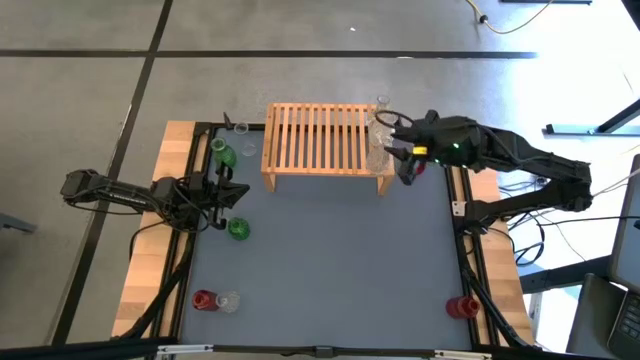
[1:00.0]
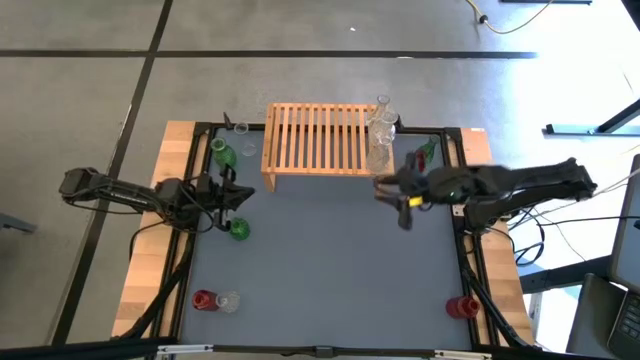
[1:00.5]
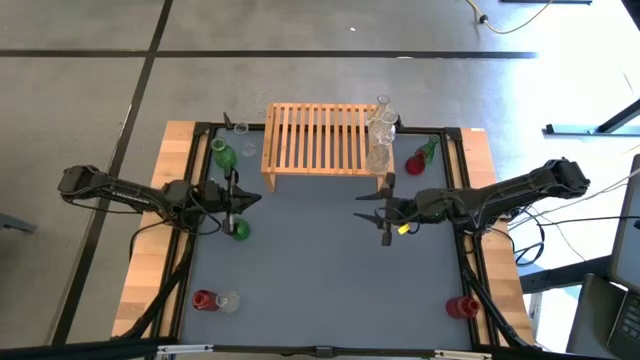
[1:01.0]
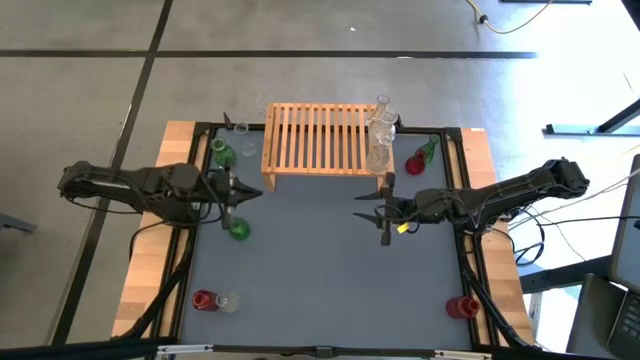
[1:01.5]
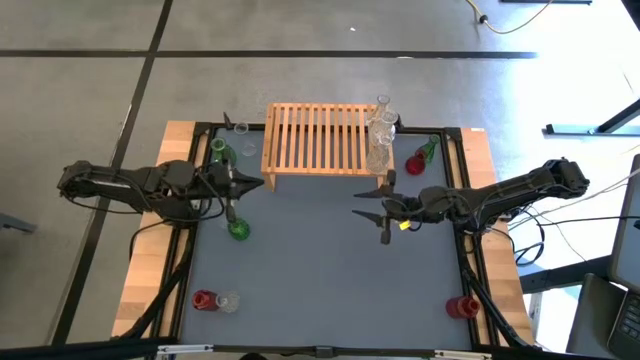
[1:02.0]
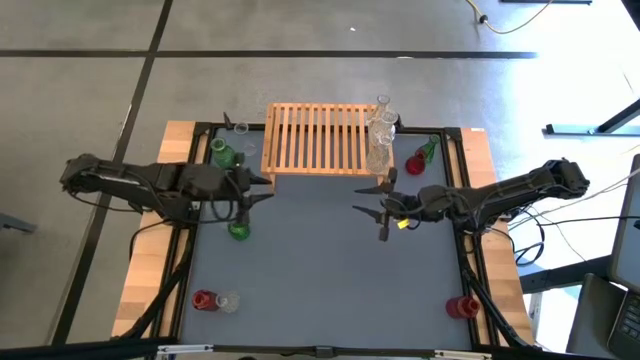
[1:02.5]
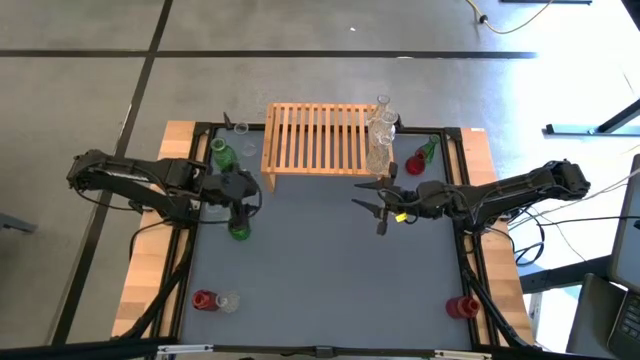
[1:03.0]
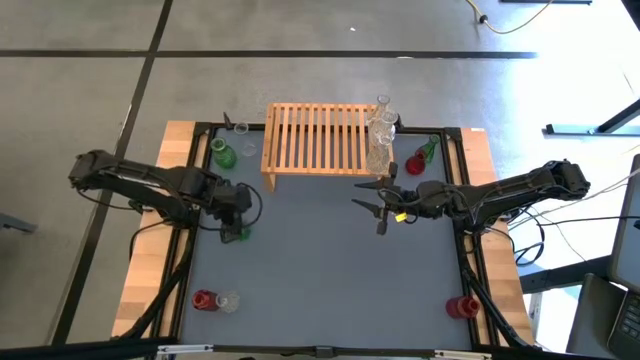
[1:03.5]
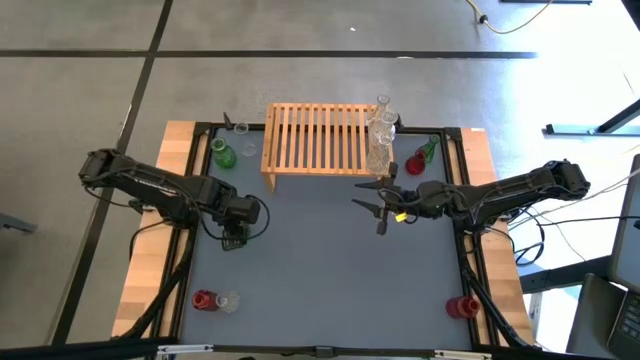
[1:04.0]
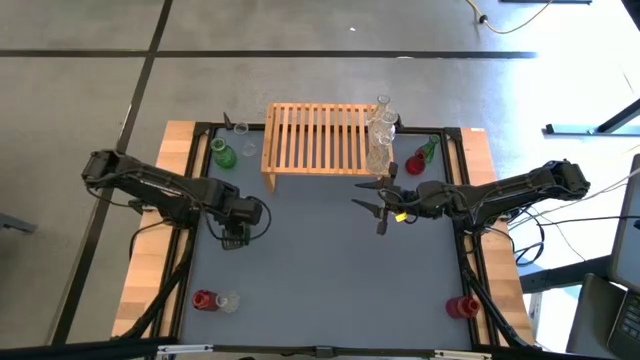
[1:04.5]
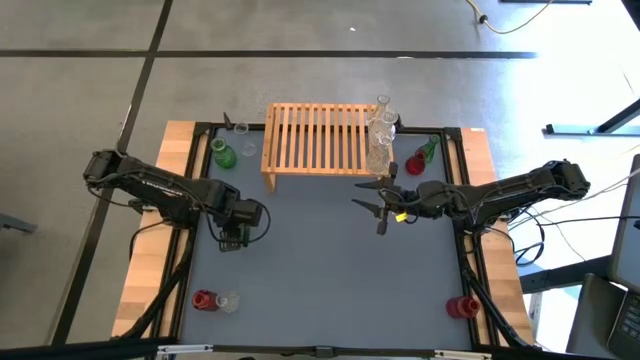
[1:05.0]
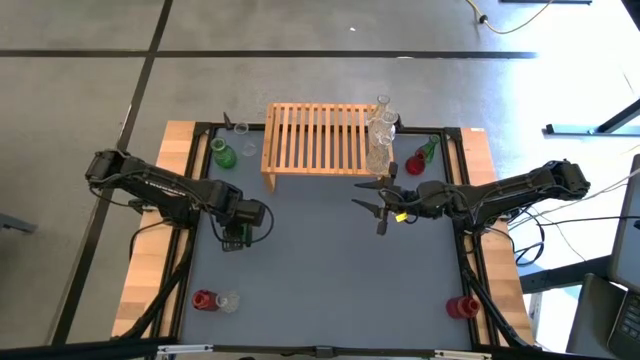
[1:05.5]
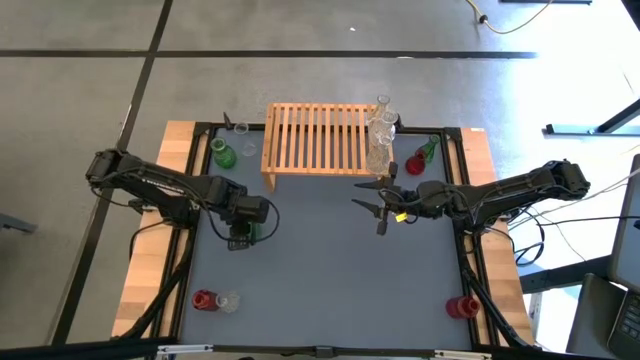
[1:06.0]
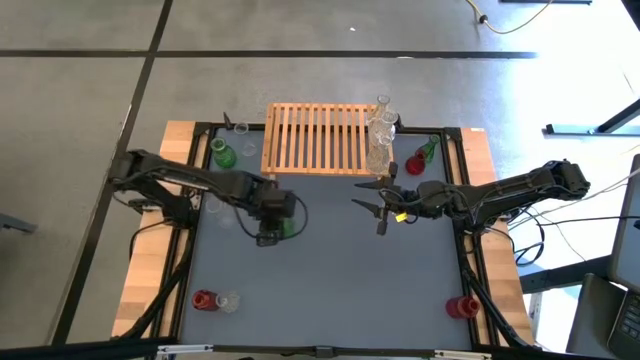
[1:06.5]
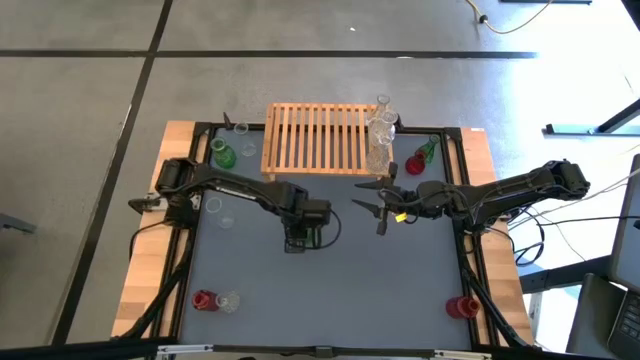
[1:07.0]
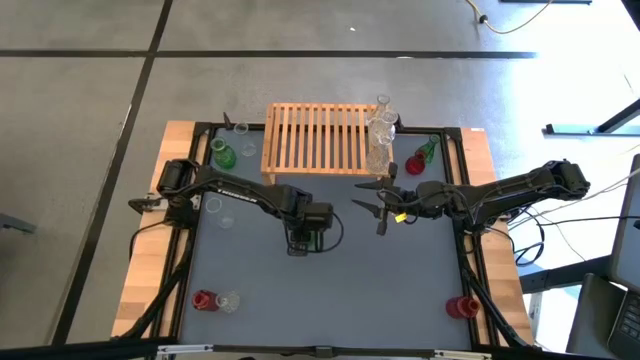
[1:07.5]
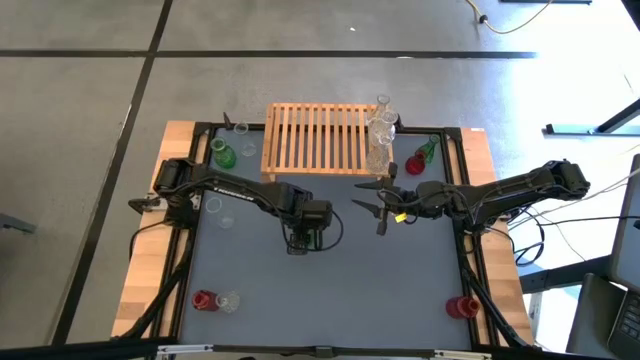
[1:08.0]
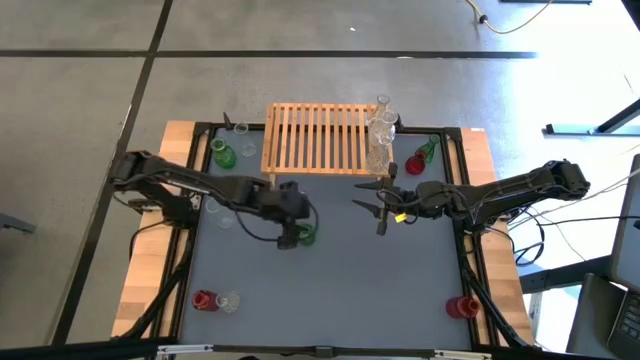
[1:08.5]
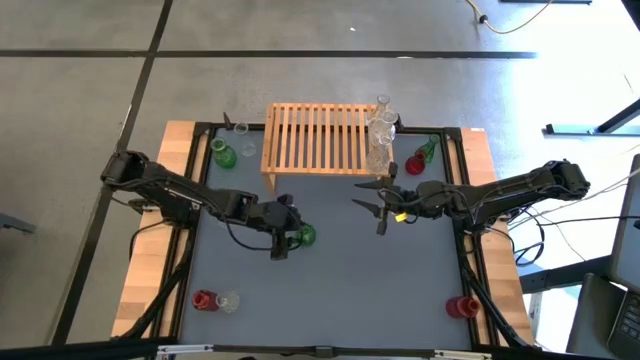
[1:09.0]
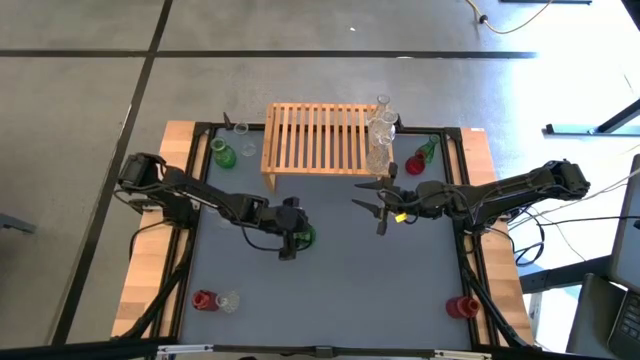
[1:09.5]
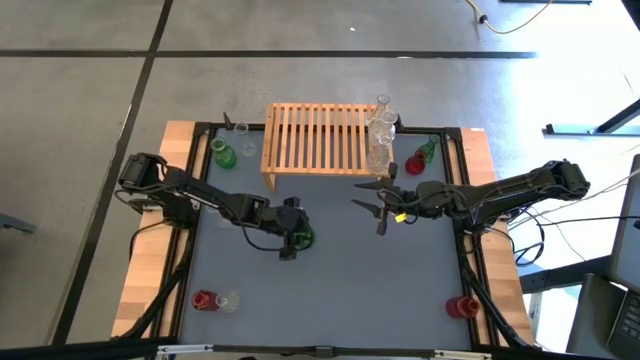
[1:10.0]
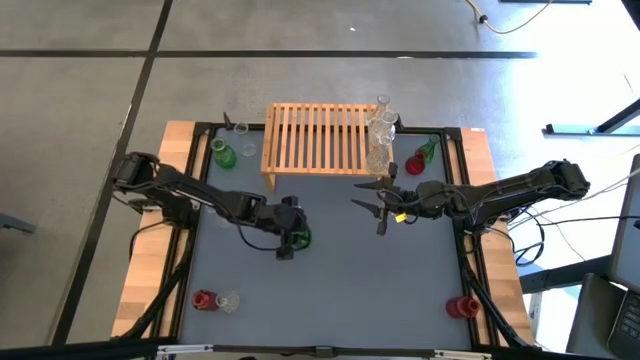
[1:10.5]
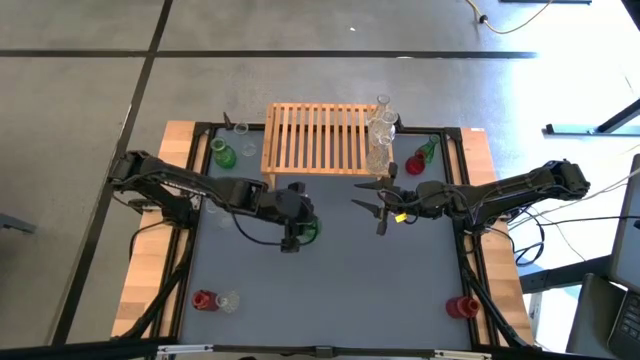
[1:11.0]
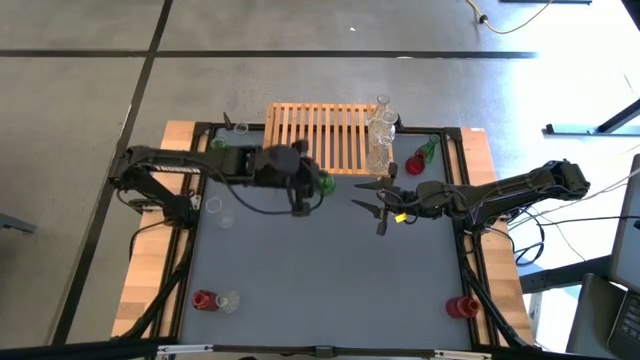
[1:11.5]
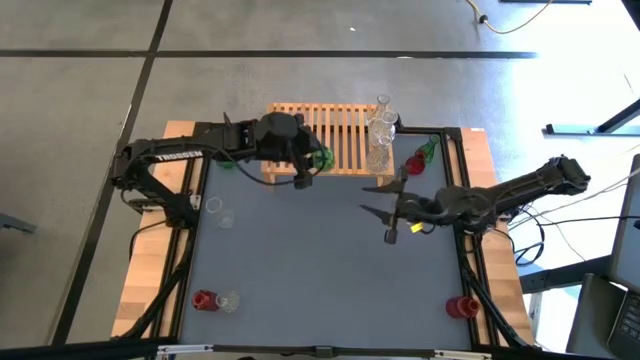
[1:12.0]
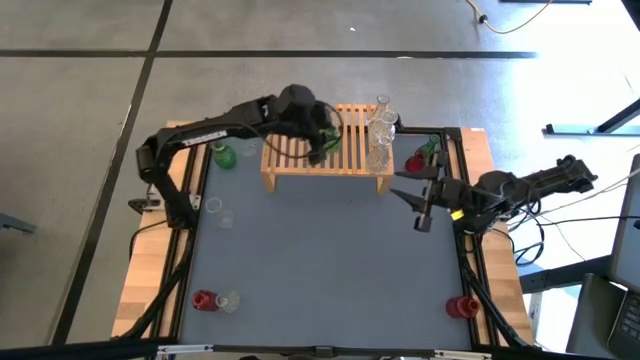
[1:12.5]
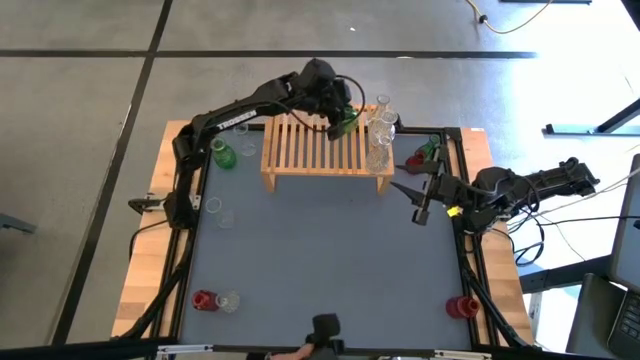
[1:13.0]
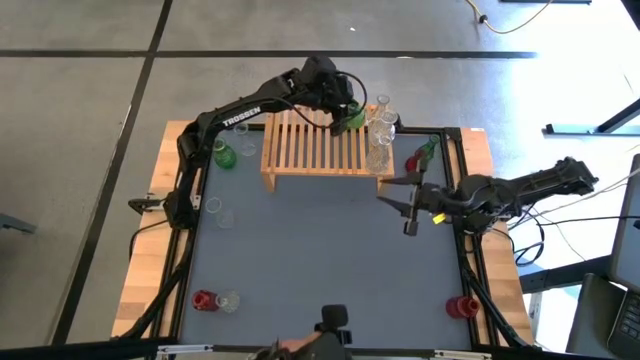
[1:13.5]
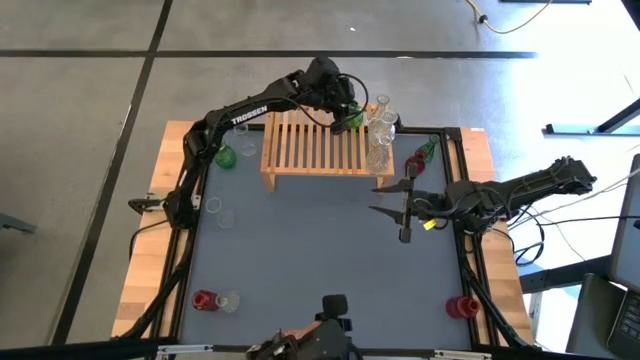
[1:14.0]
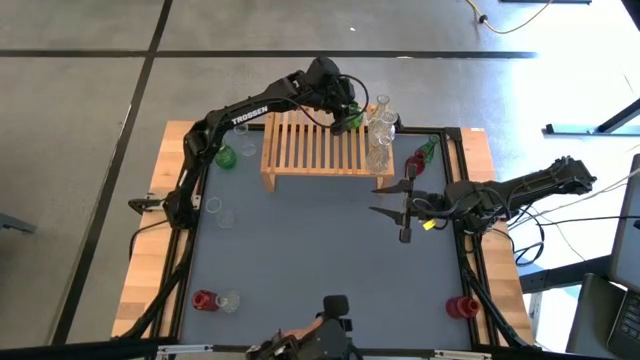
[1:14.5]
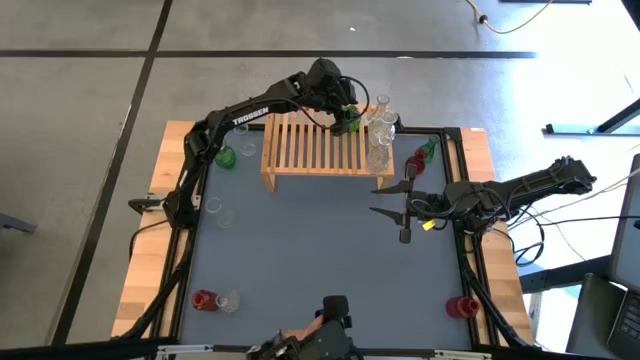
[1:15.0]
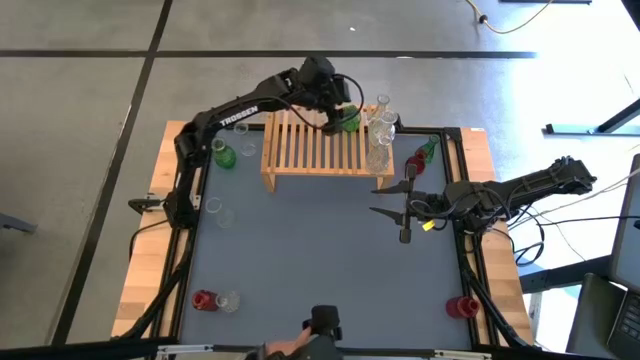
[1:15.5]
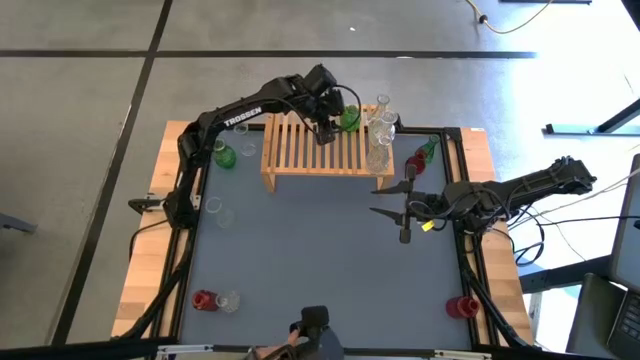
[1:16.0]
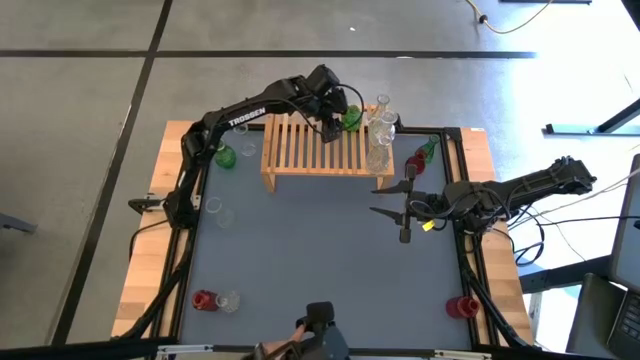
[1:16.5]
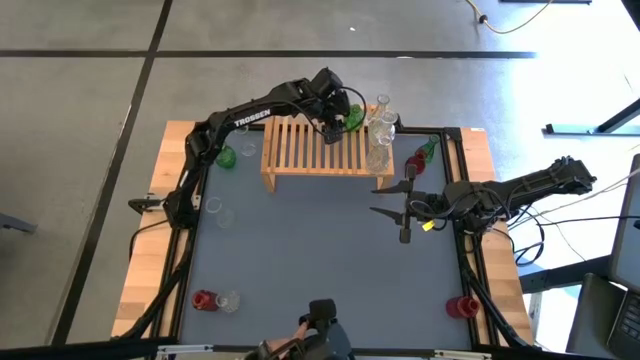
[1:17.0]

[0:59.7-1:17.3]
Task: sort vases onto shelf
Put the green vase on the shelf

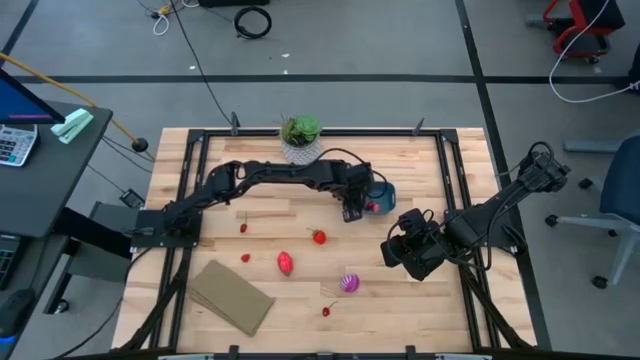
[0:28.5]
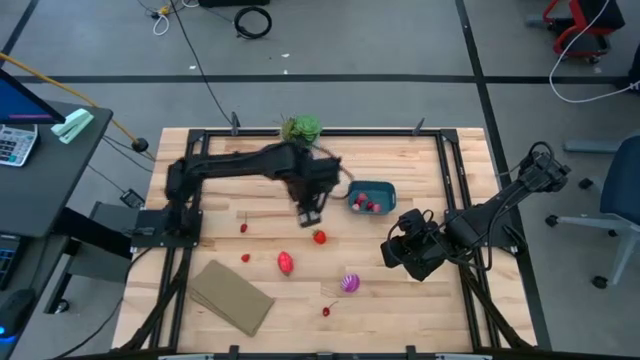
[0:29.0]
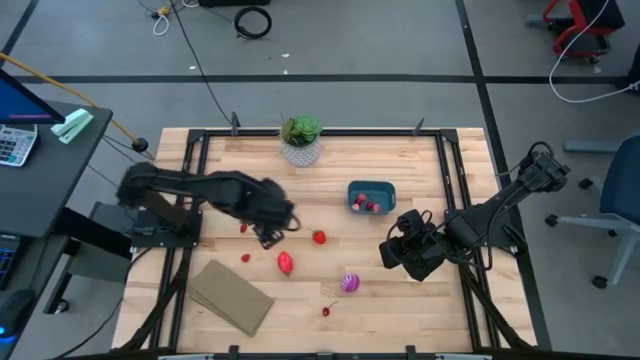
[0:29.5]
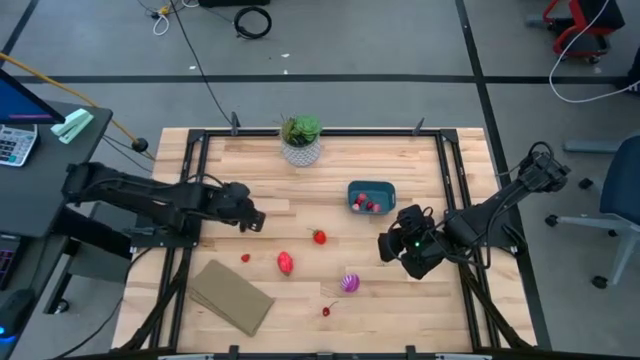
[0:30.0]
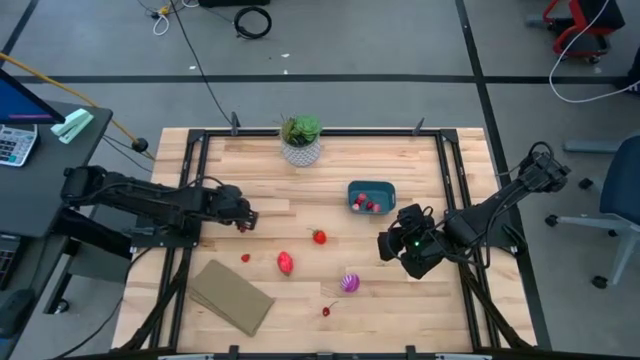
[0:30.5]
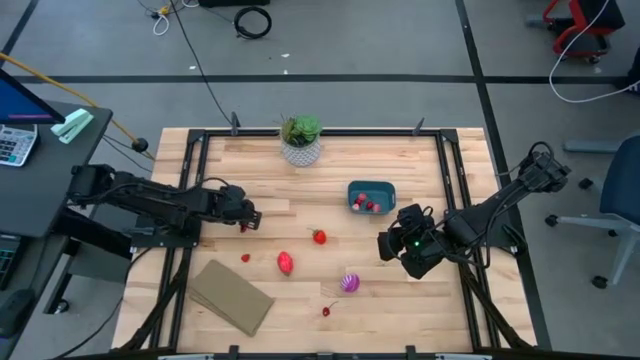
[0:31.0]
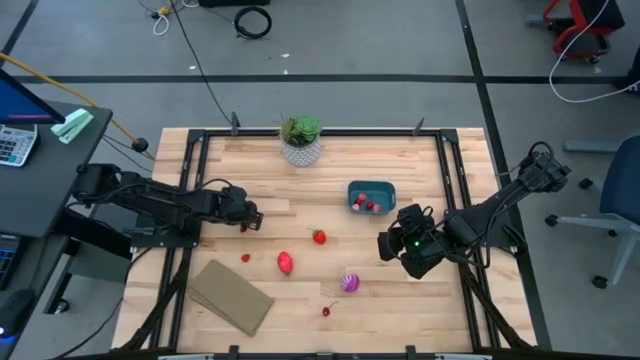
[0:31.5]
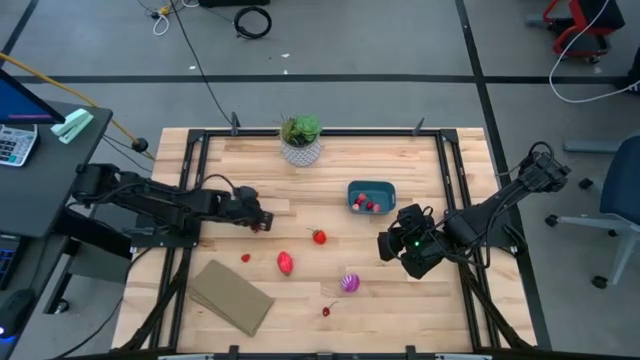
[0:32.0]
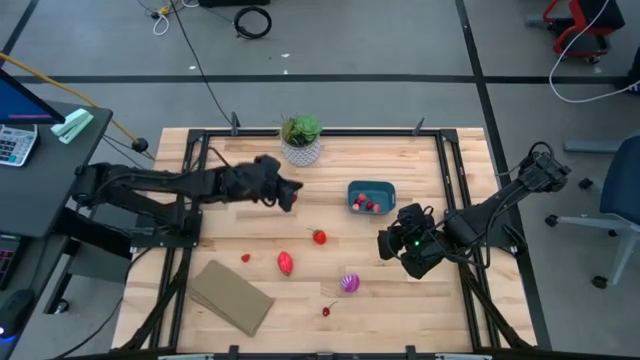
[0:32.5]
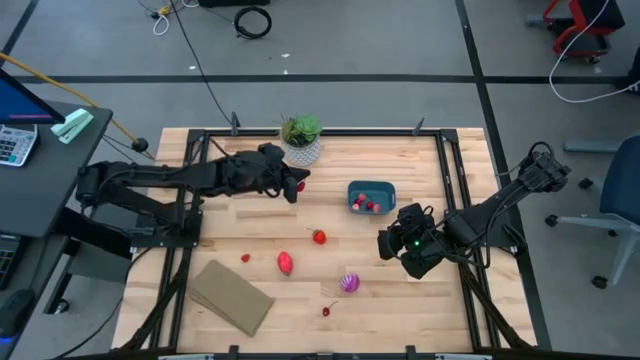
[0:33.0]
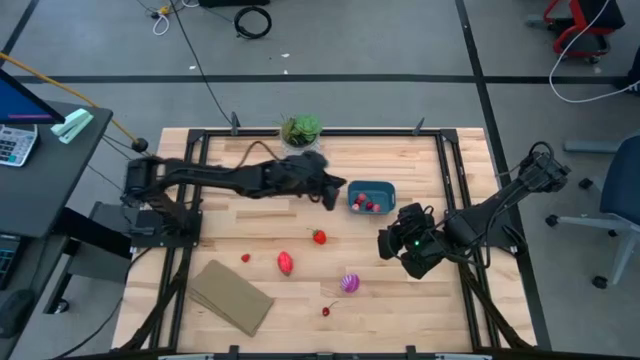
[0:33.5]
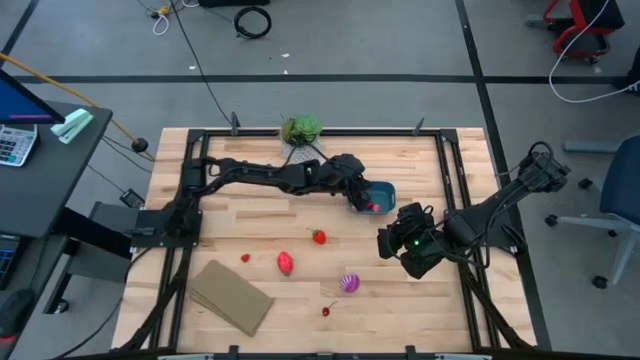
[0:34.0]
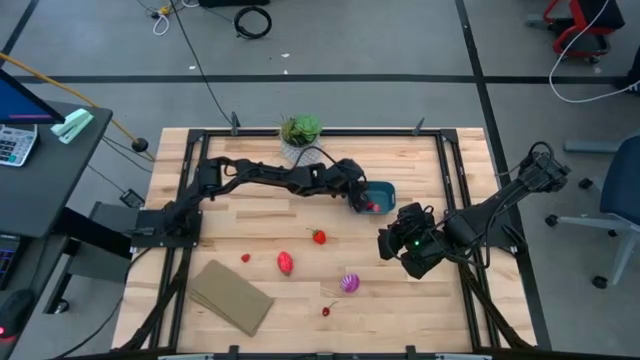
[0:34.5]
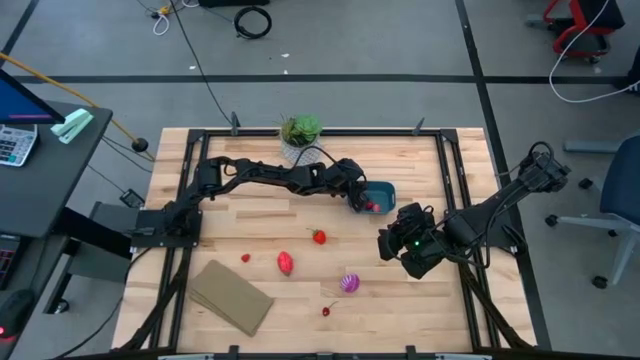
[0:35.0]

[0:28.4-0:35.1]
Task: Pick and placing Produce into tupperware
Put the top red cherry into the blue bin
